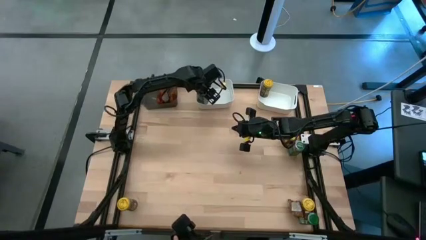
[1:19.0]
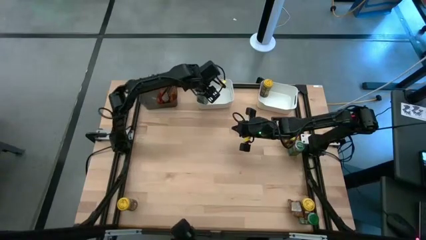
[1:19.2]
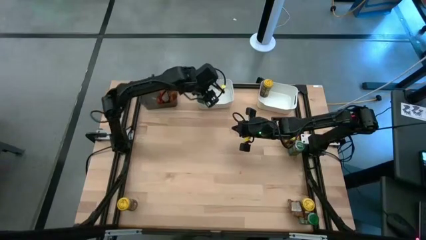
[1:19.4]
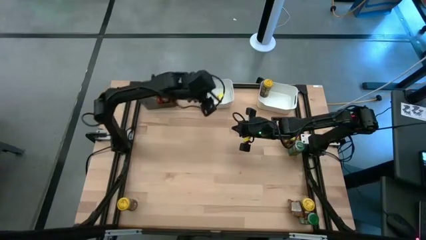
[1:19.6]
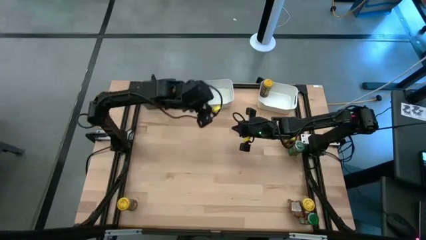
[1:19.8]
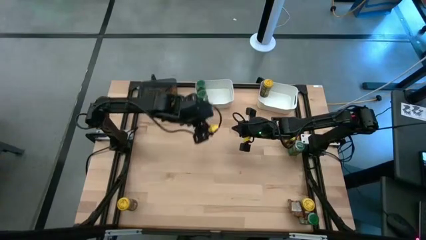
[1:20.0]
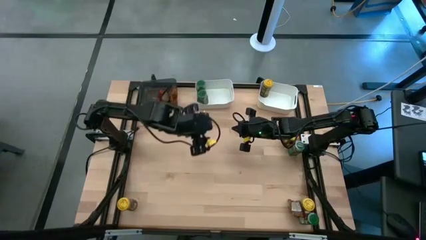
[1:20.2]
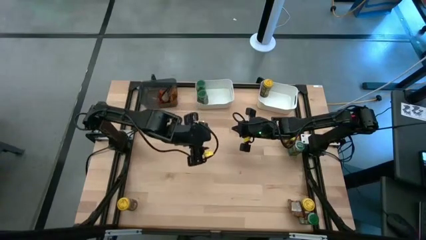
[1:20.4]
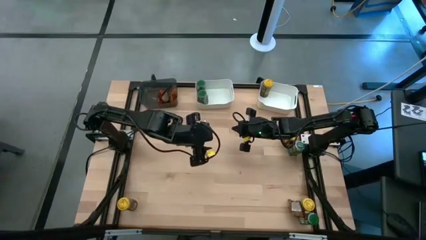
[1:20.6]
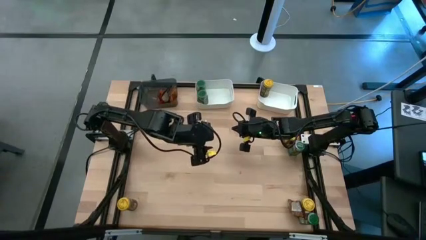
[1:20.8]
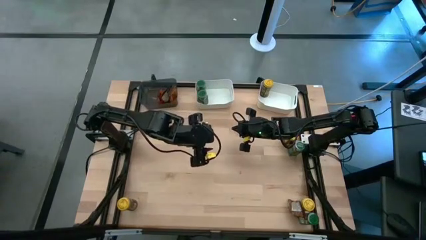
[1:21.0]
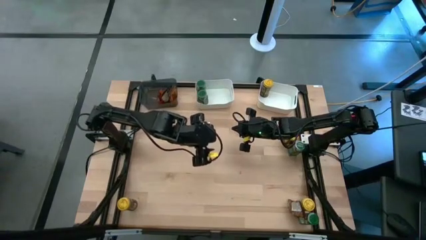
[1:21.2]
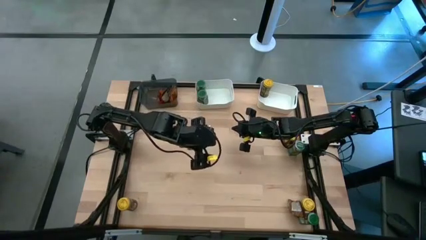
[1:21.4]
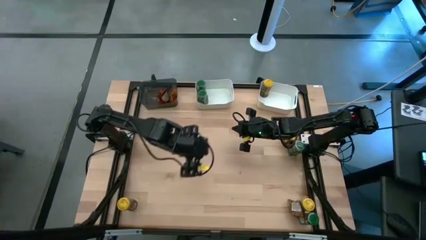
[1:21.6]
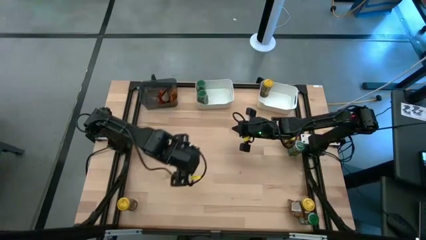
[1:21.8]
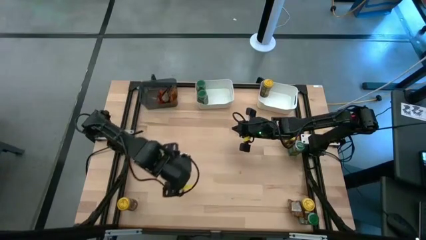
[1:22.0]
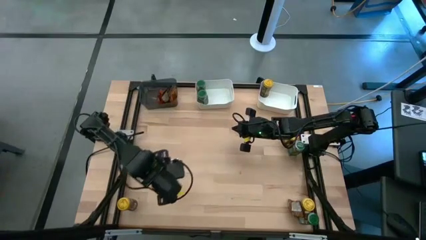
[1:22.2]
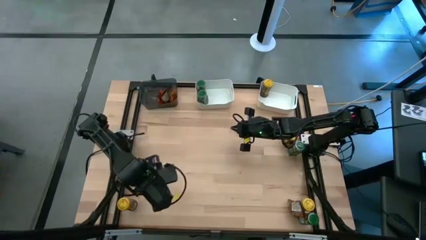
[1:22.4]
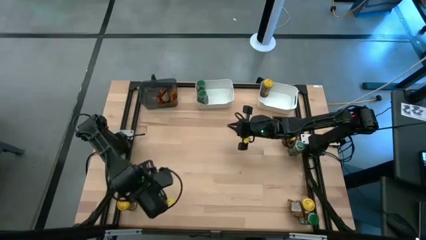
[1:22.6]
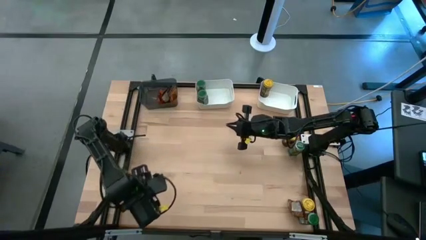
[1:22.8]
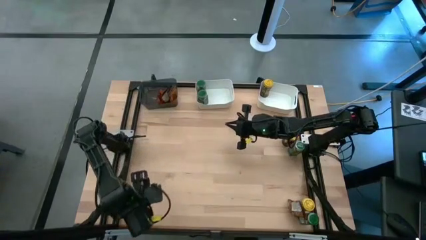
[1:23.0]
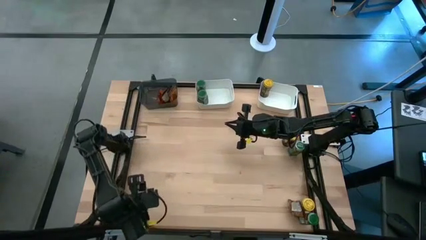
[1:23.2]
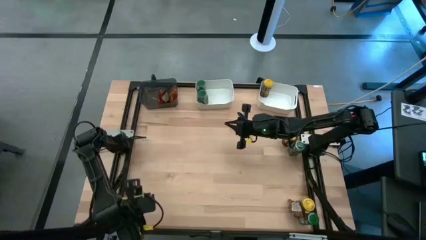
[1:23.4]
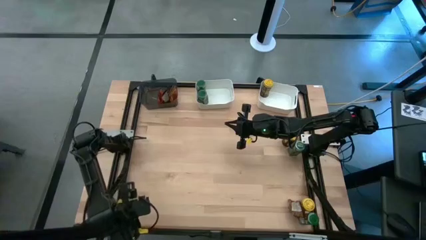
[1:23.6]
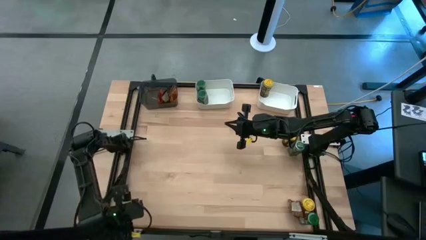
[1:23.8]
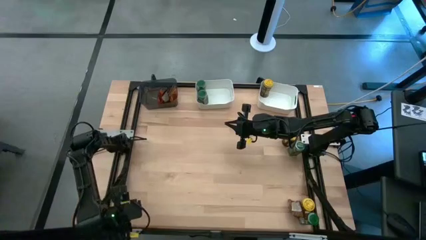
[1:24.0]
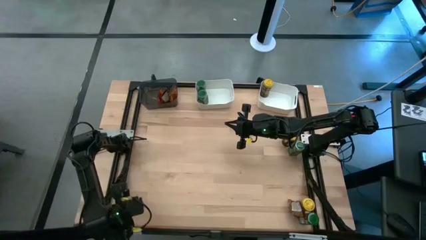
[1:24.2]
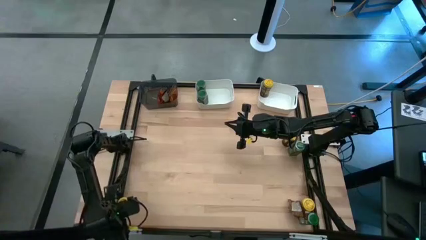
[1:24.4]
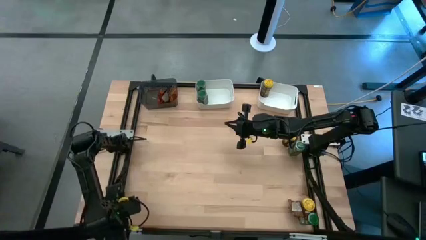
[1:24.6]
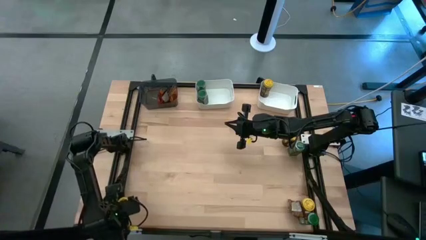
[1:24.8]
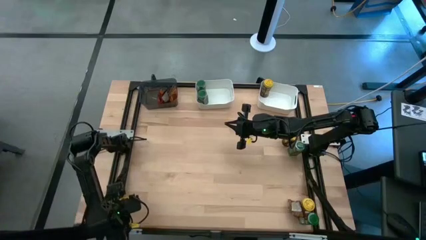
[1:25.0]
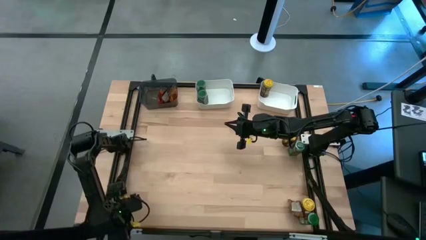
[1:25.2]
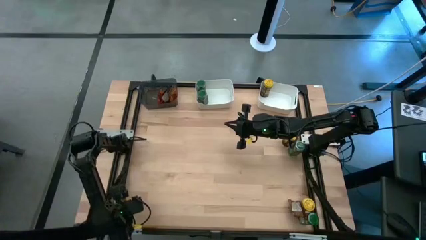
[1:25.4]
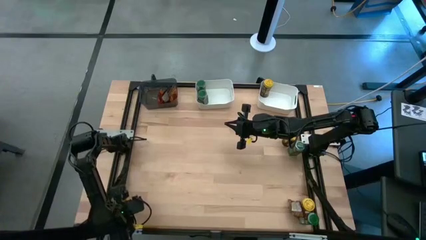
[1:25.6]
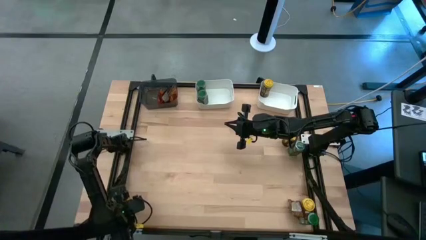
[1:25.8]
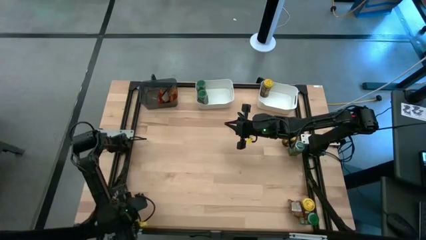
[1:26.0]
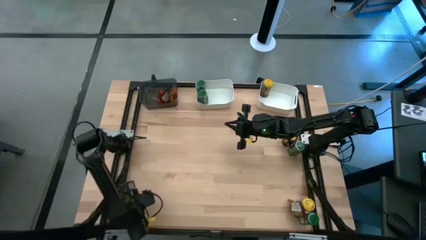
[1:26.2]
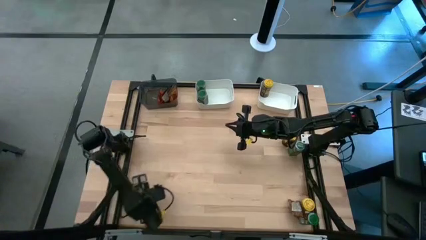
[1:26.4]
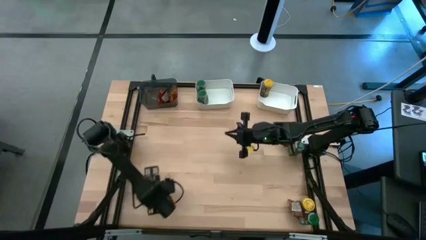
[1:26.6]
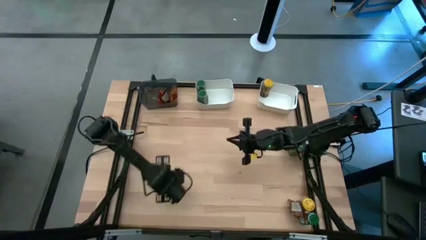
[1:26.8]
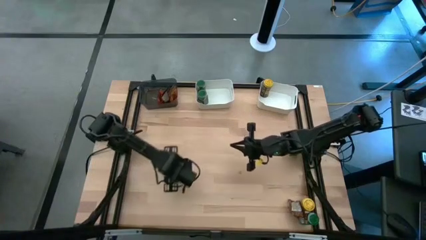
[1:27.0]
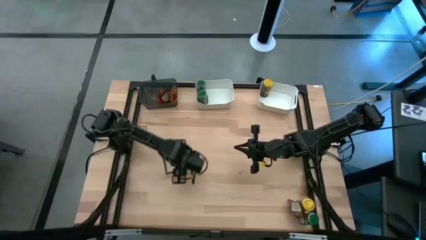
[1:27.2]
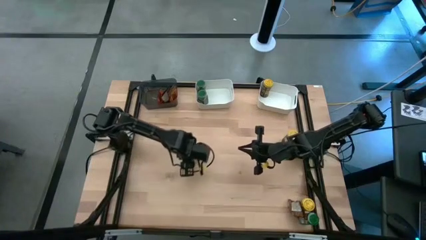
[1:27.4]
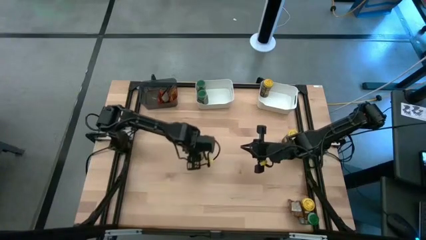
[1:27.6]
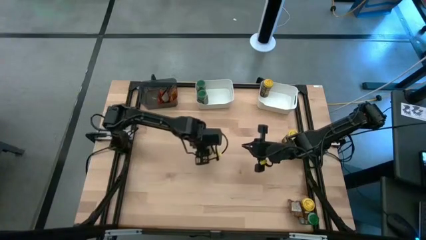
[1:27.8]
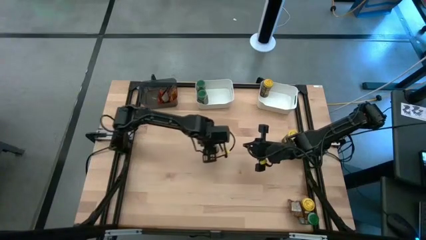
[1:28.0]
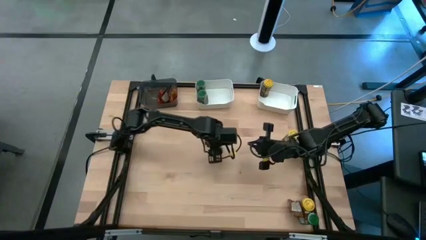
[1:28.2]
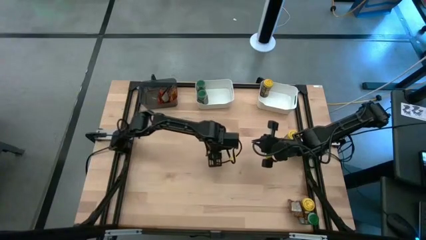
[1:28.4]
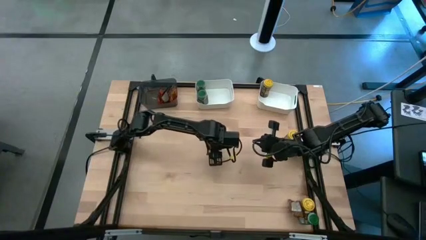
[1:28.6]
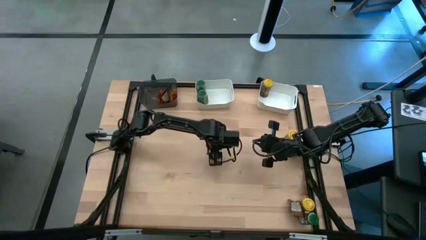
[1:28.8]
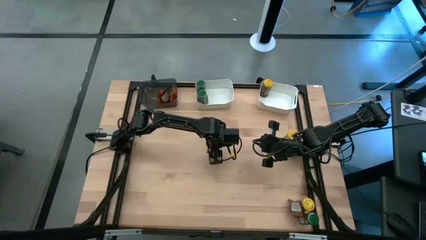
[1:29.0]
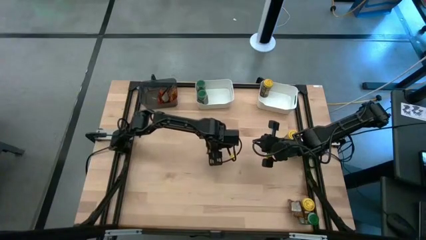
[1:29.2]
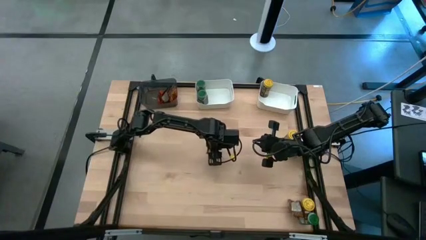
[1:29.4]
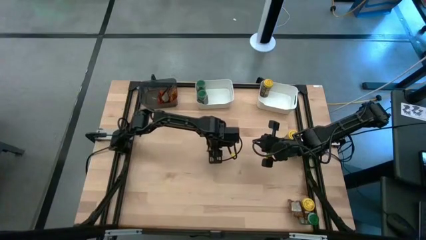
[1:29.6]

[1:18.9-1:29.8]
Task: Sort spices by type
Put the bottom left yellow seasoning bottle into the right white bin

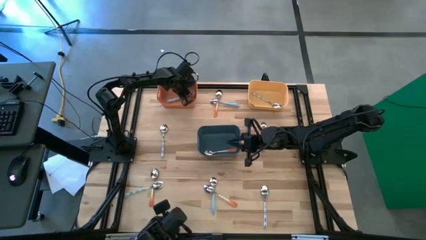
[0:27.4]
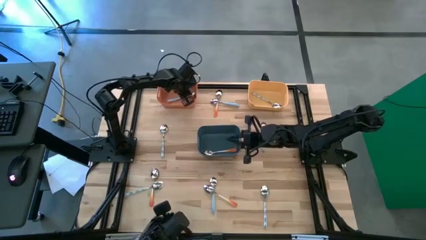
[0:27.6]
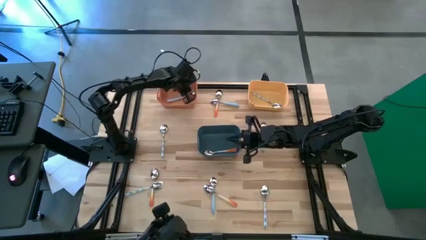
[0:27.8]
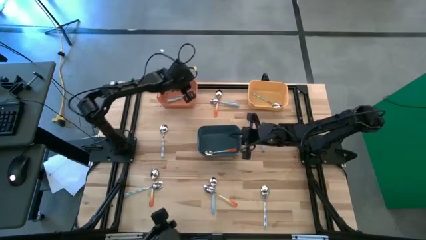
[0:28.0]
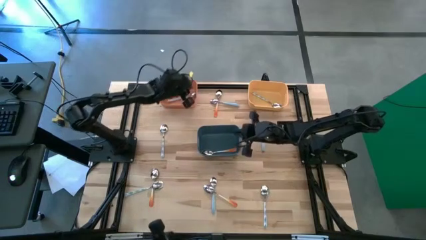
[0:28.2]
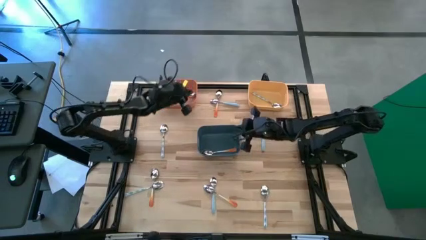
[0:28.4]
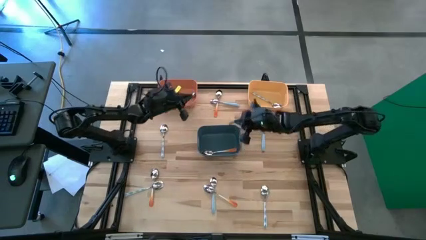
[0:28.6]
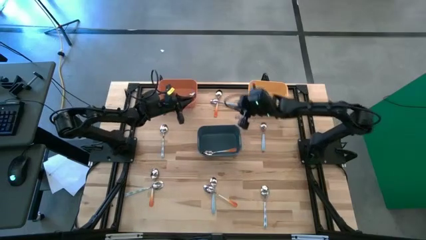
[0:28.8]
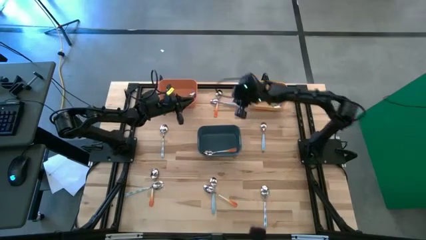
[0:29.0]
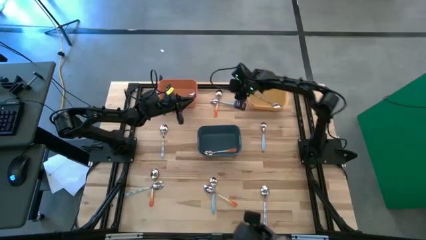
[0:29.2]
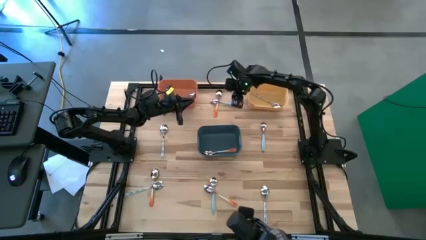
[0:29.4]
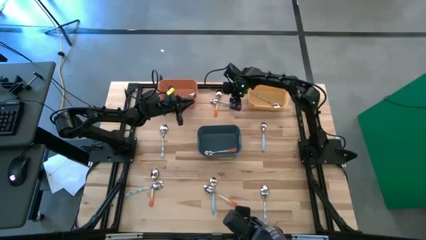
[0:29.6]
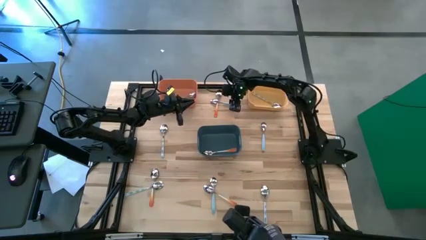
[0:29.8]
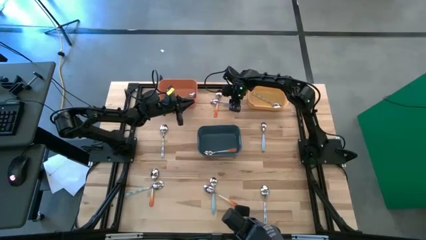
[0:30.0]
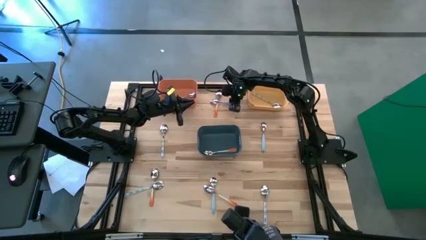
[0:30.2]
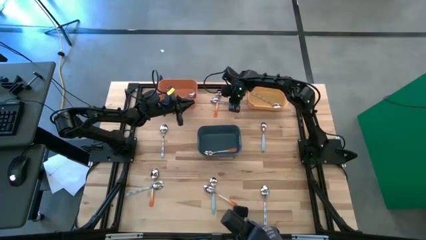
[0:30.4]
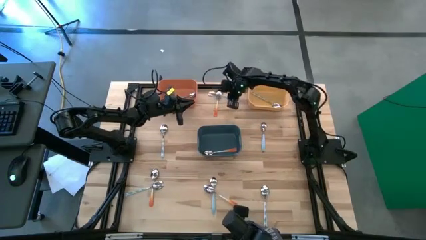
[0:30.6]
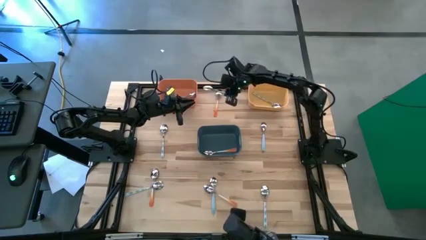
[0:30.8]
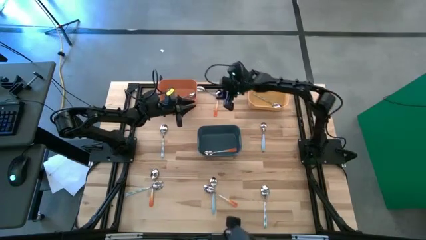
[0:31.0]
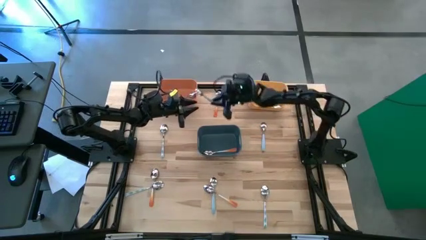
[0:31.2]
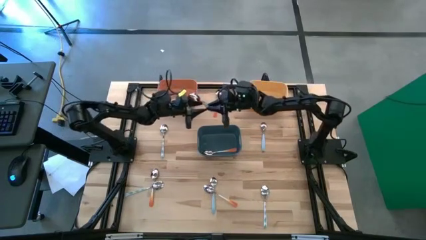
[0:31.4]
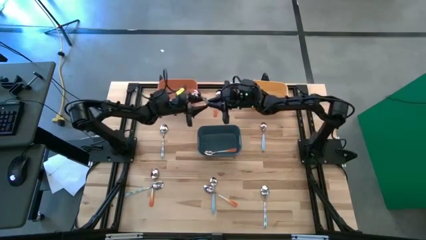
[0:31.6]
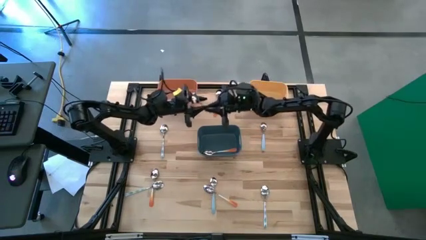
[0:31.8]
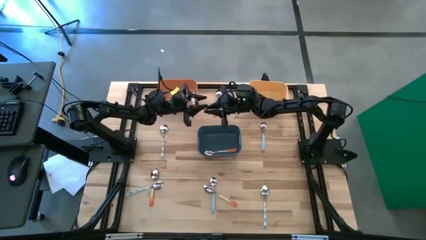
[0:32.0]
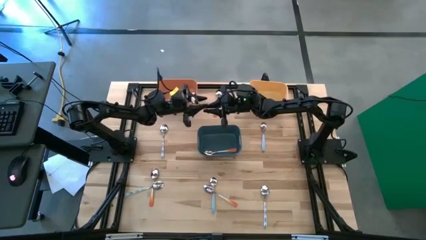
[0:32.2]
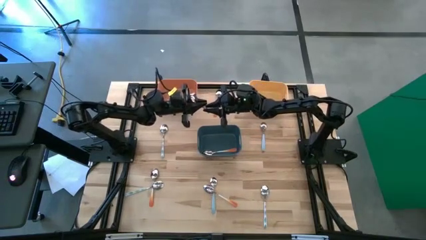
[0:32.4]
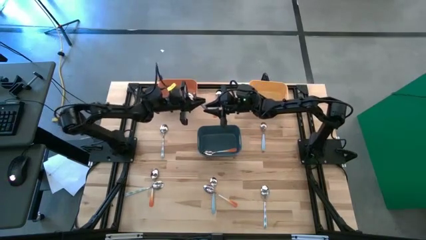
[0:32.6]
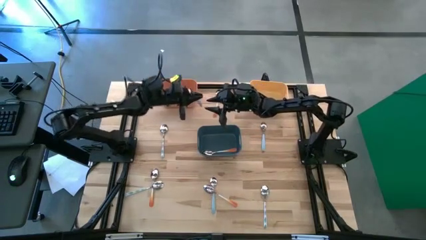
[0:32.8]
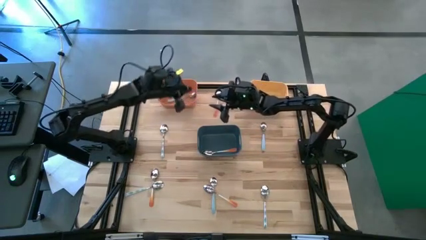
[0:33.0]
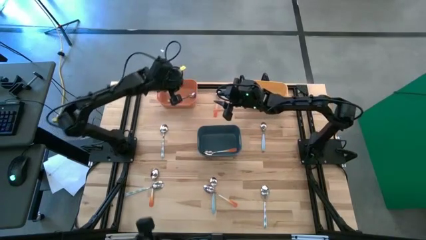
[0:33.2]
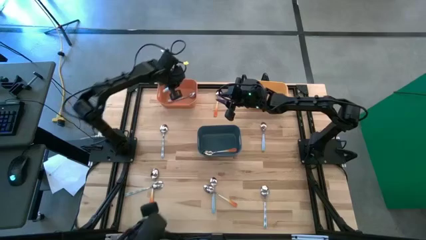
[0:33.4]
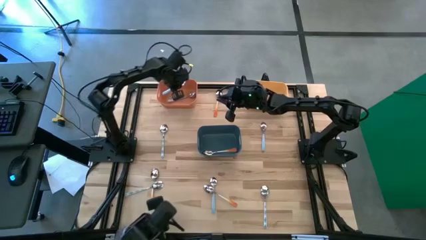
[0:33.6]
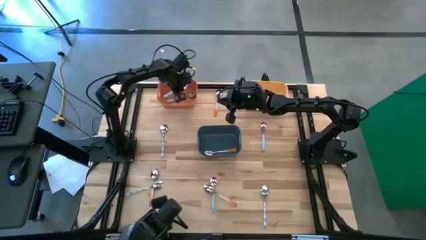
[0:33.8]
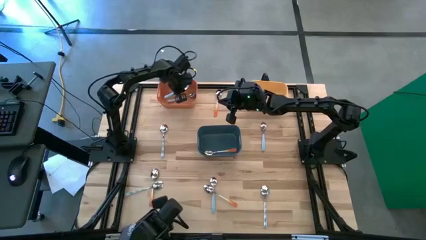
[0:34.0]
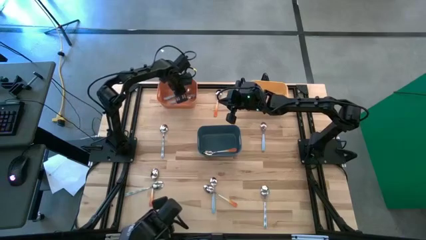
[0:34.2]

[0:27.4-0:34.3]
Task: Sort silverware by color (type)
Put the blue spoon into the orange bin
